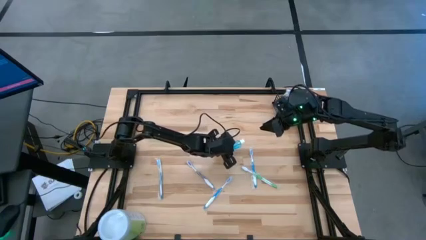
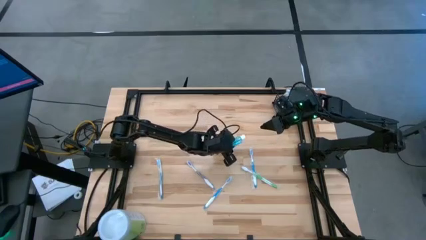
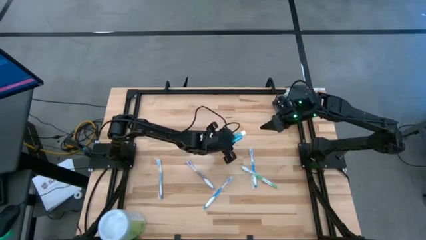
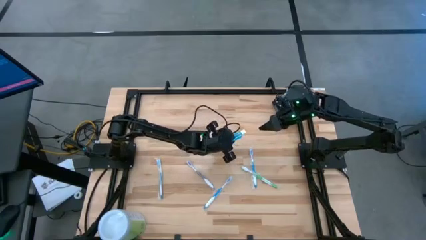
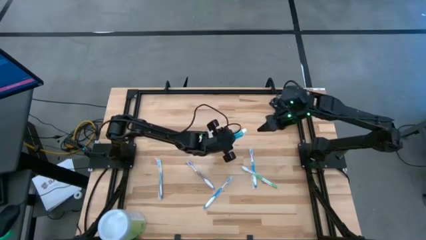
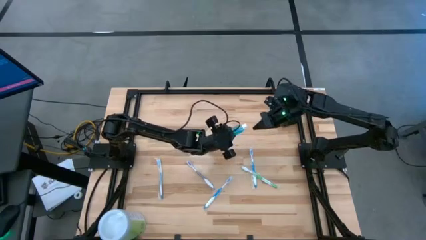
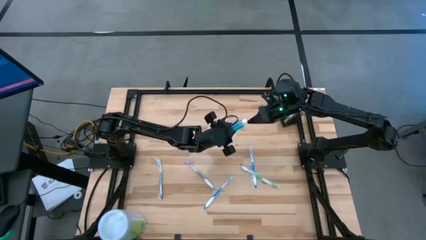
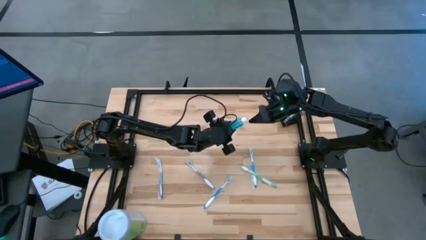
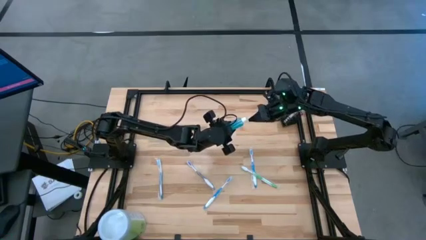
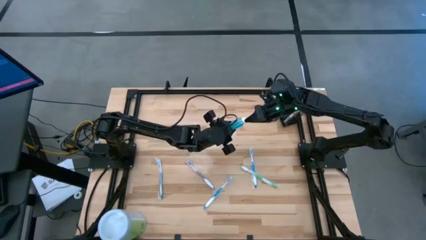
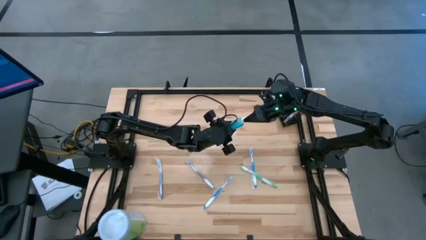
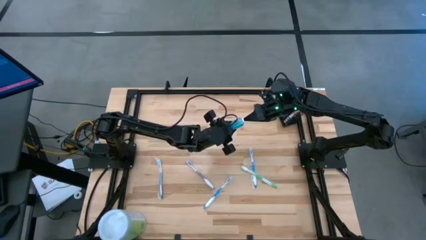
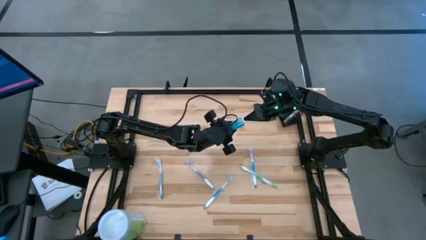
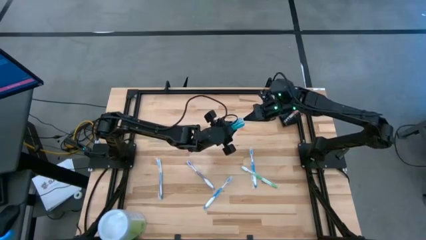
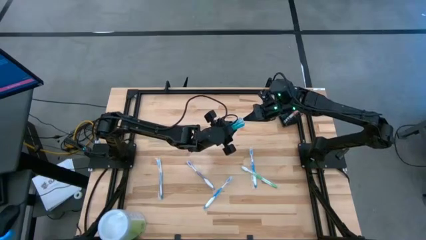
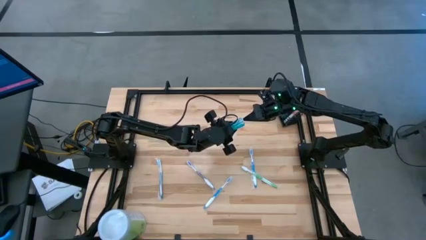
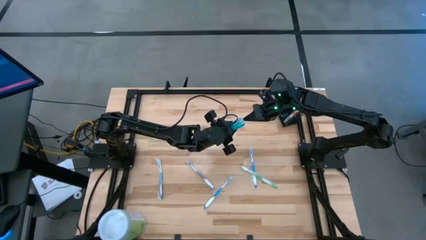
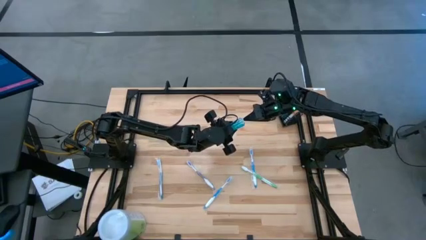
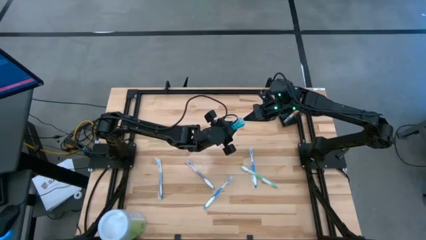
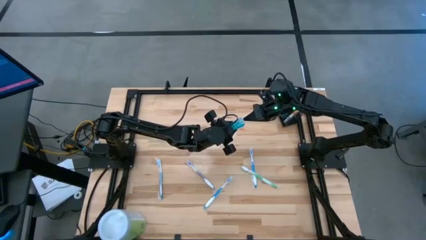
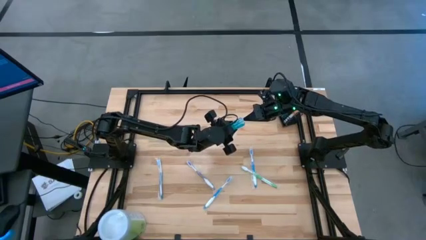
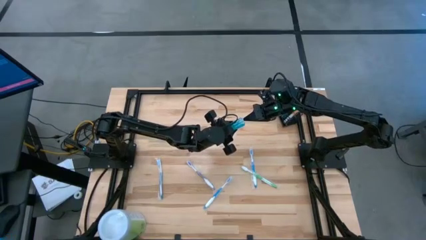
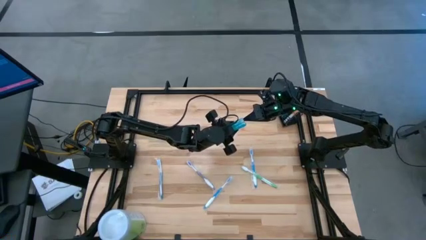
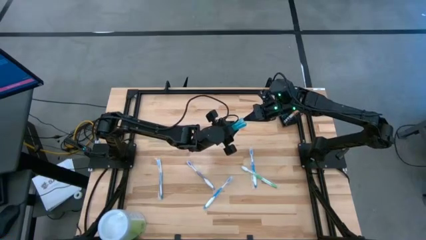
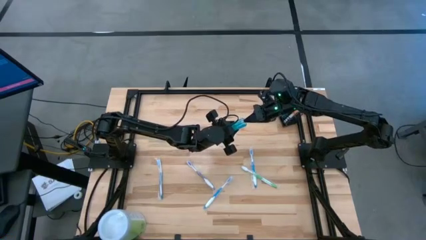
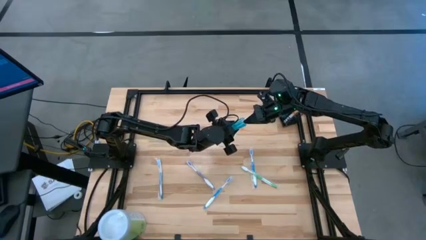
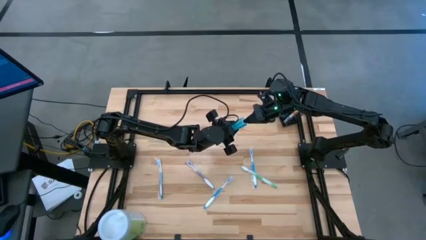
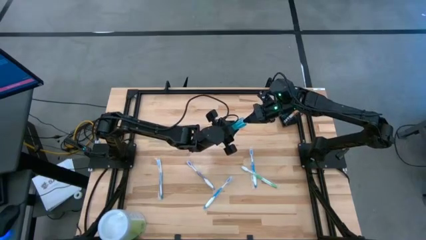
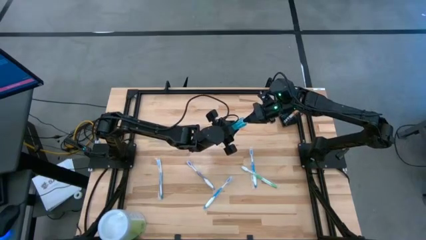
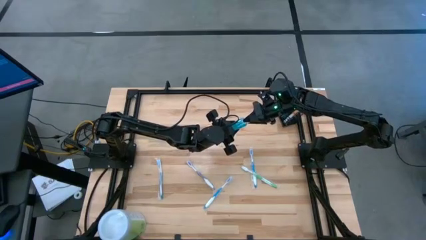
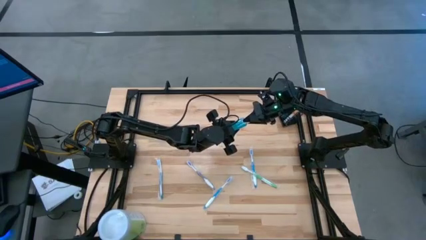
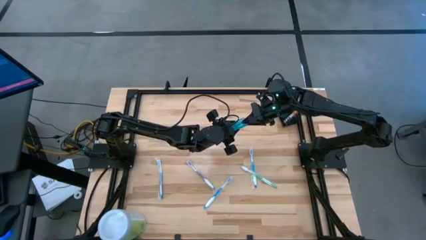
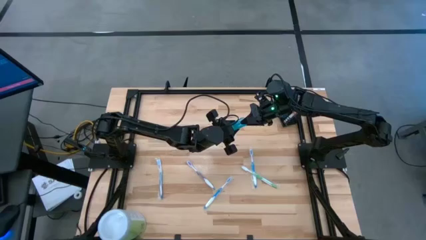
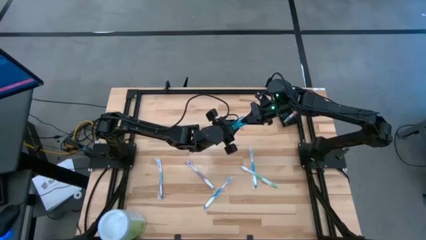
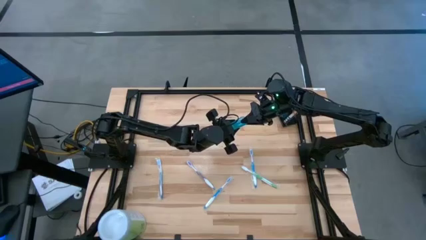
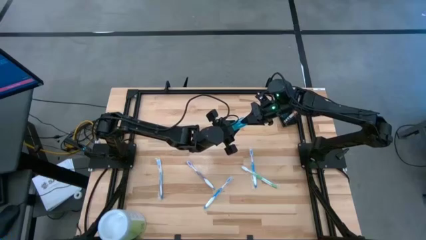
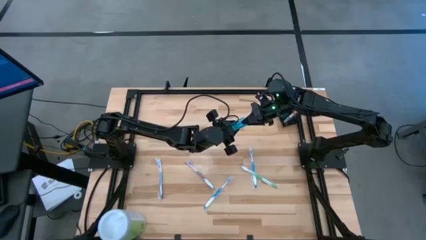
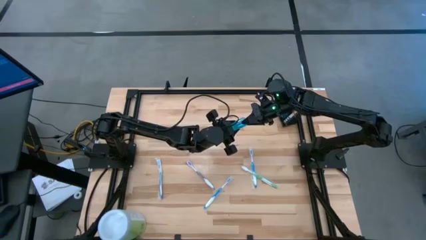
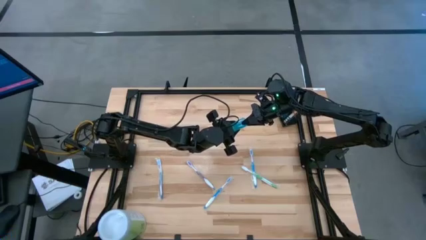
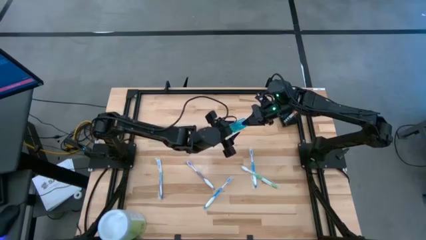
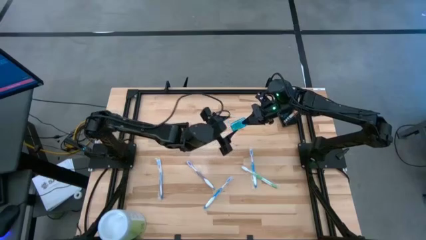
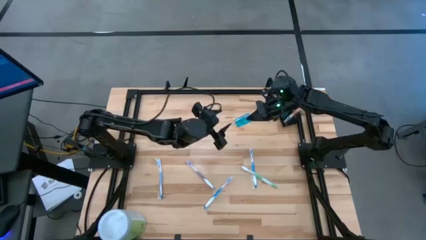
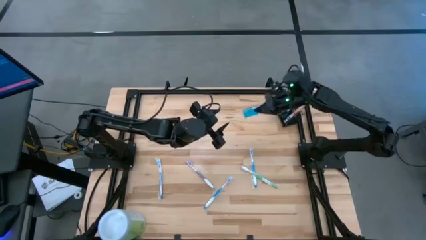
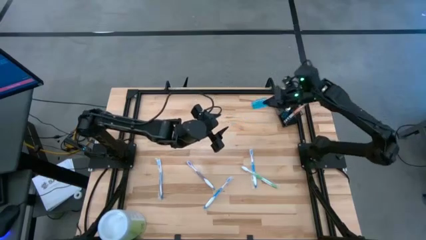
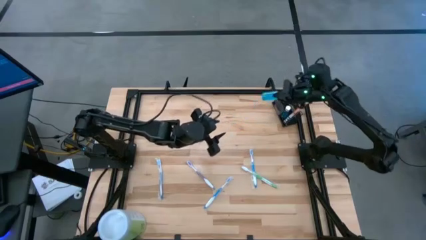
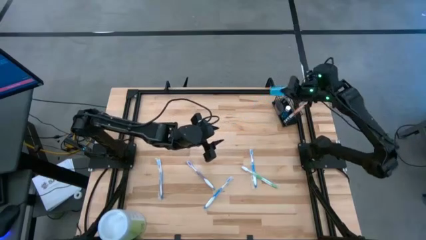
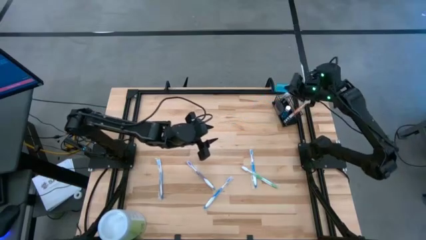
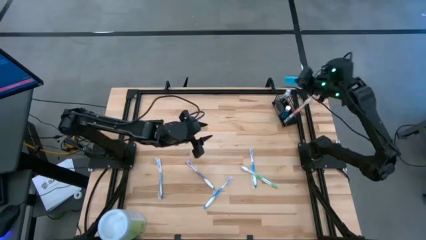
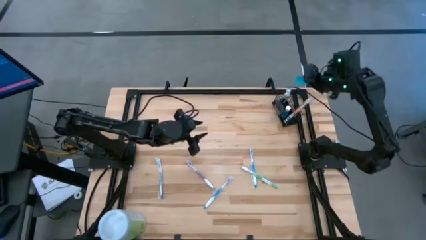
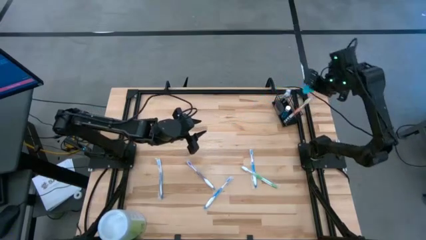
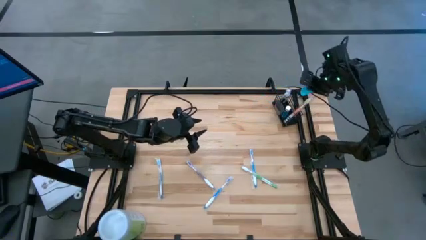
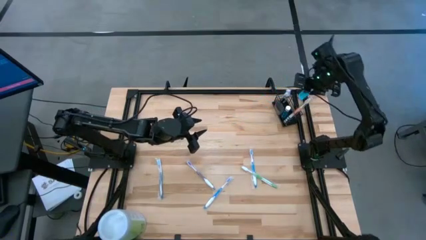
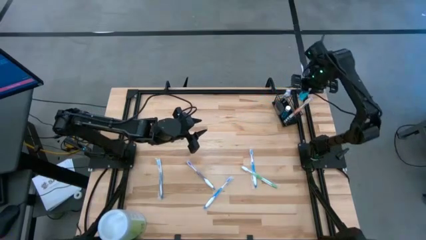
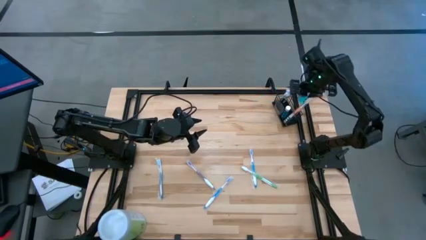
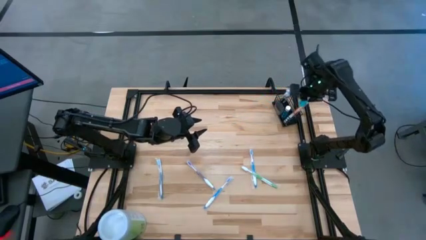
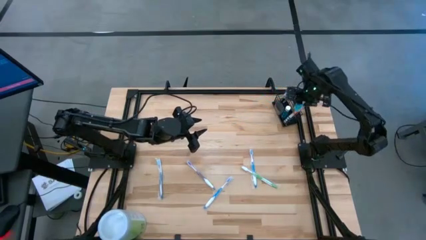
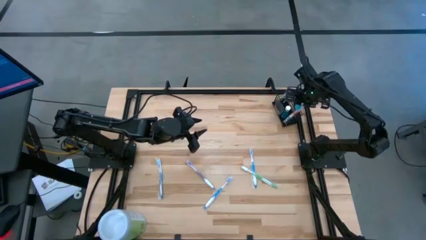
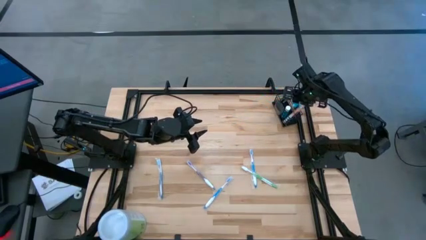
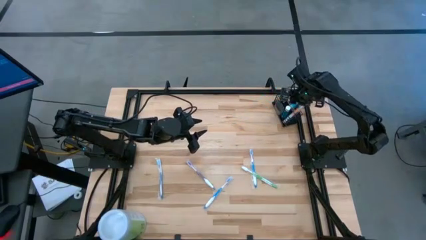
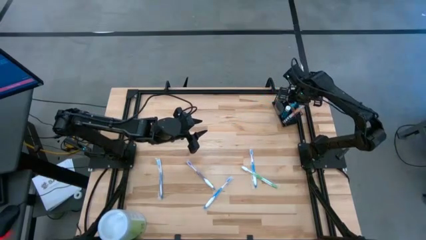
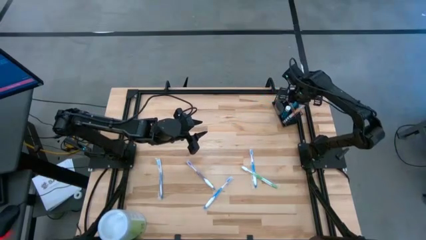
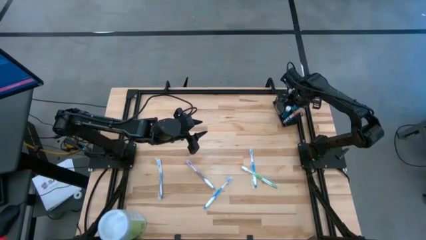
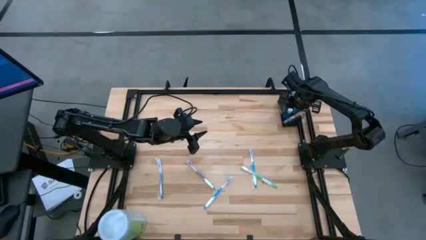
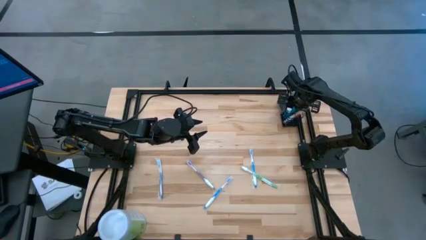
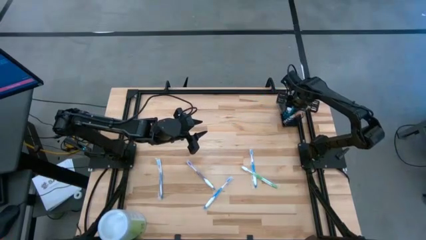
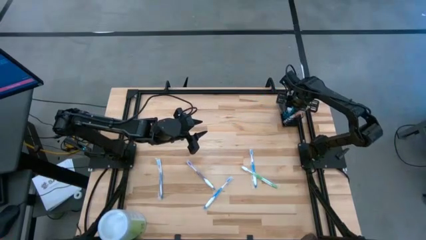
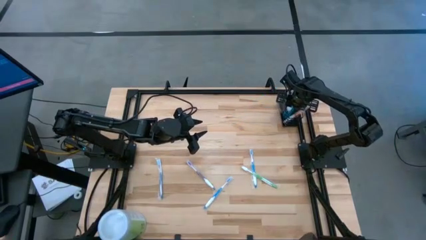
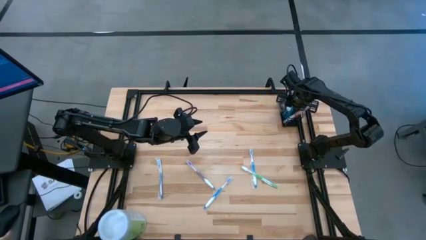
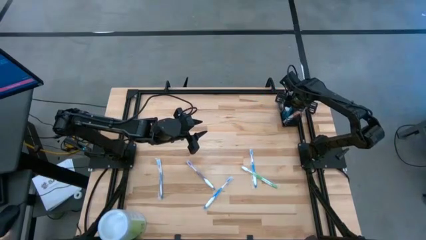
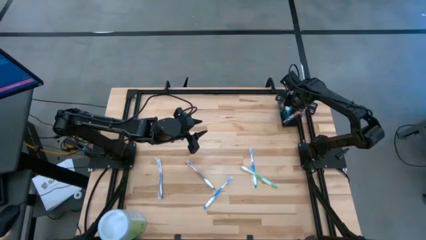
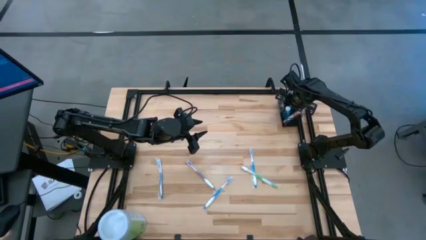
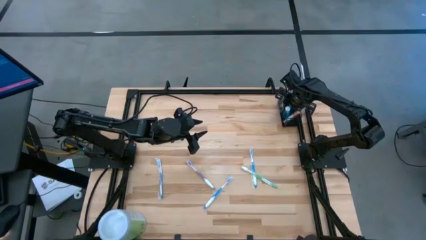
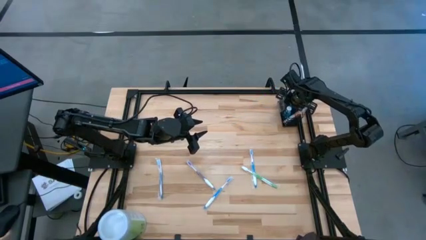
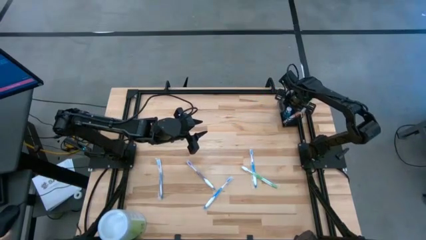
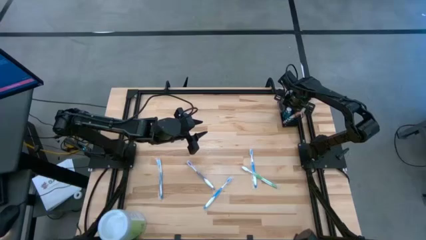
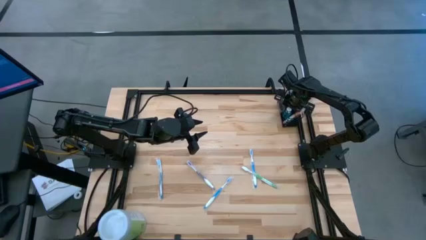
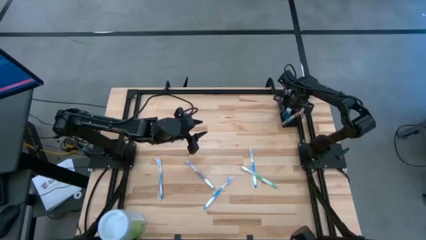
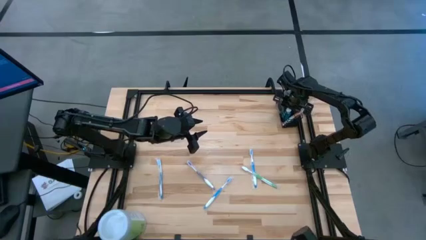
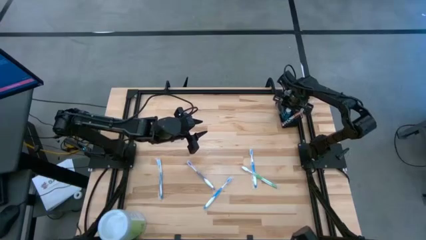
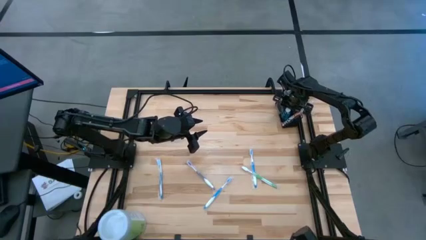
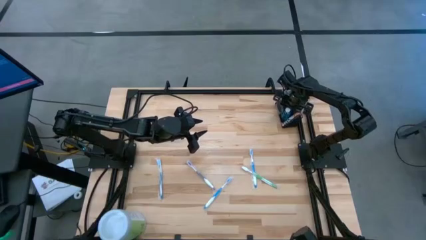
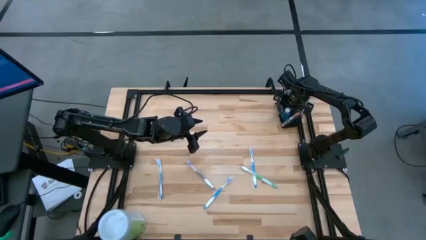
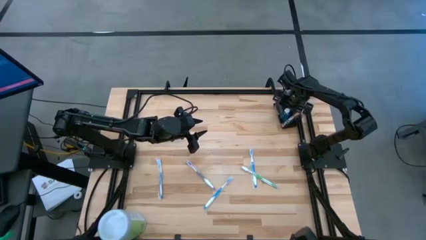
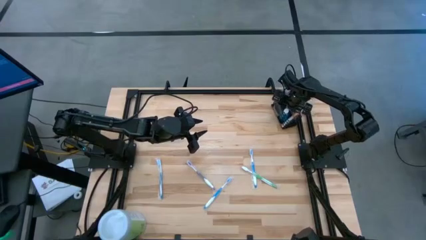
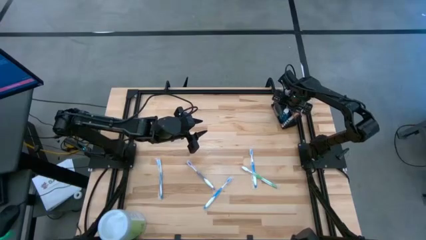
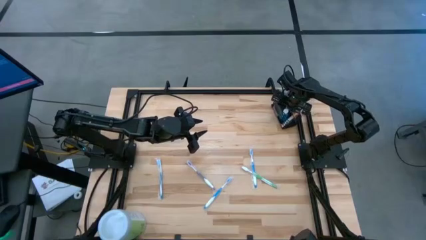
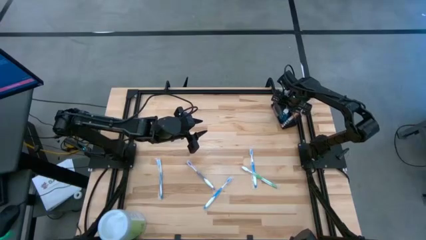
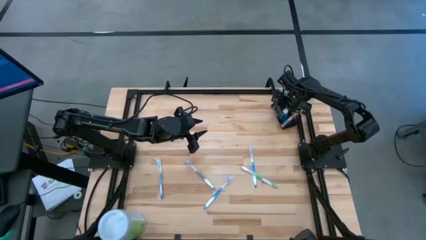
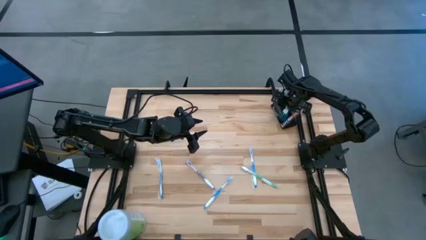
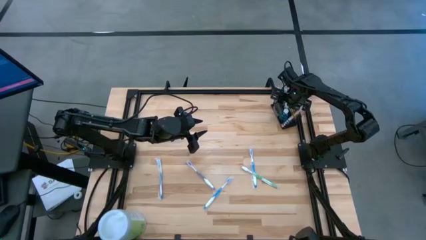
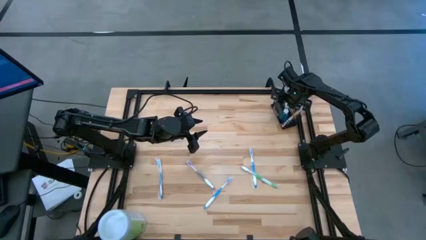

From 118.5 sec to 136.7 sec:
Task: Pick & Place toothbrushing station
Put the mouthwash in the middle section of wire organizer
